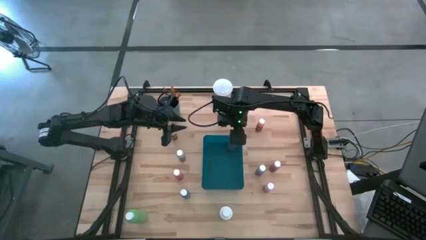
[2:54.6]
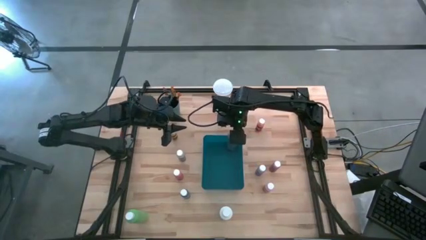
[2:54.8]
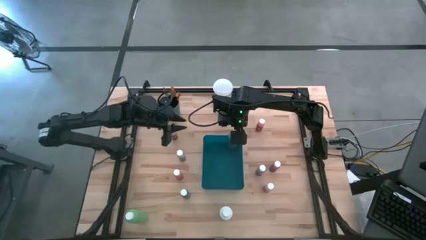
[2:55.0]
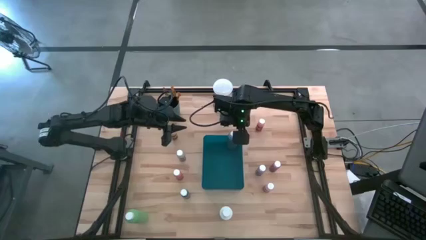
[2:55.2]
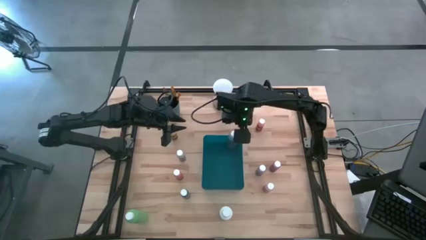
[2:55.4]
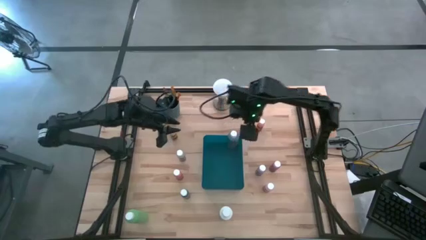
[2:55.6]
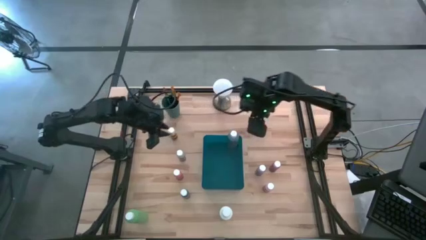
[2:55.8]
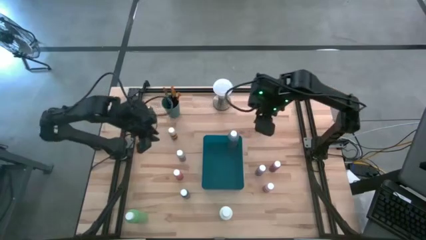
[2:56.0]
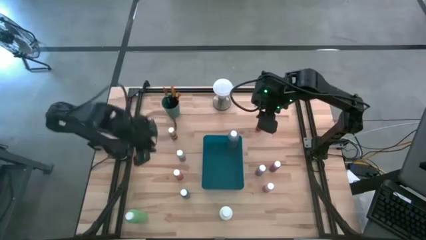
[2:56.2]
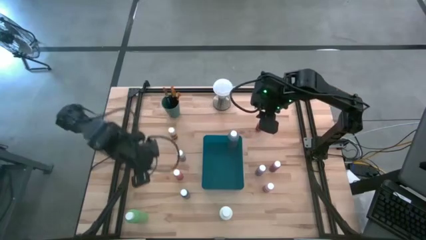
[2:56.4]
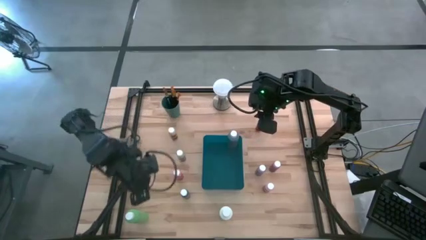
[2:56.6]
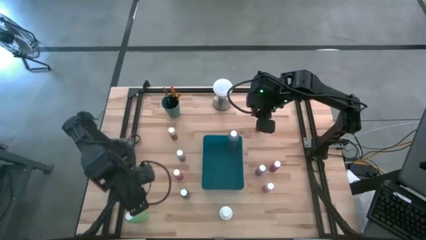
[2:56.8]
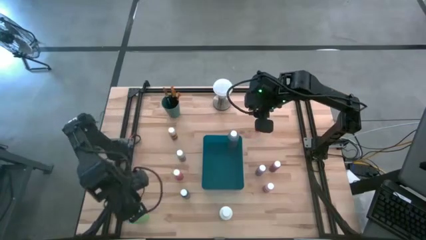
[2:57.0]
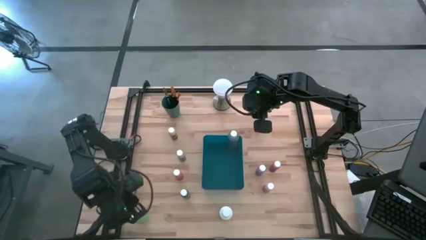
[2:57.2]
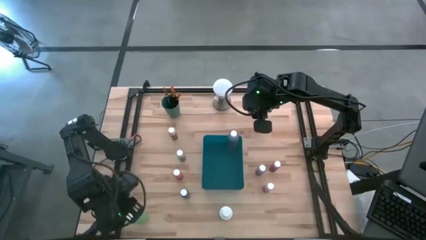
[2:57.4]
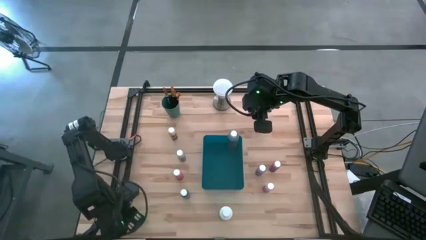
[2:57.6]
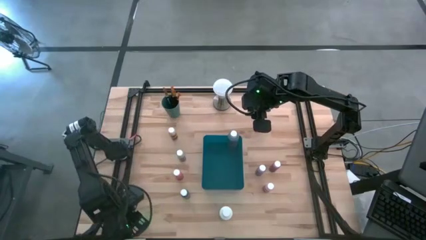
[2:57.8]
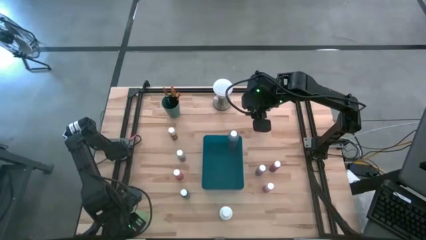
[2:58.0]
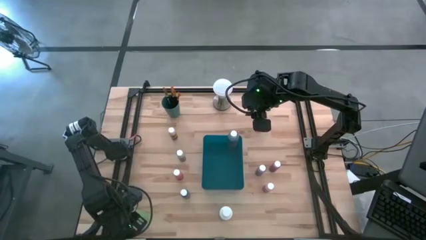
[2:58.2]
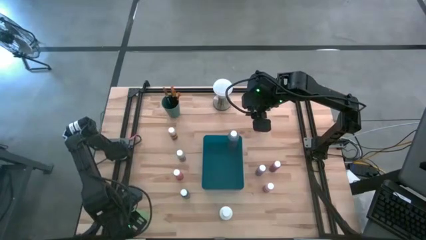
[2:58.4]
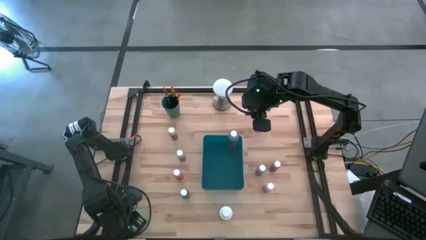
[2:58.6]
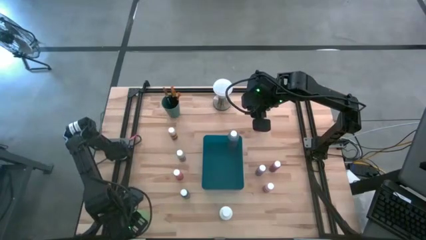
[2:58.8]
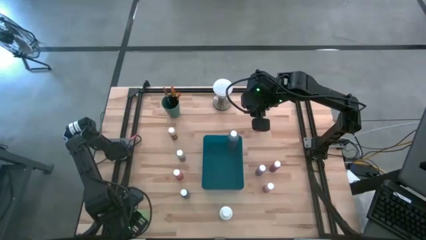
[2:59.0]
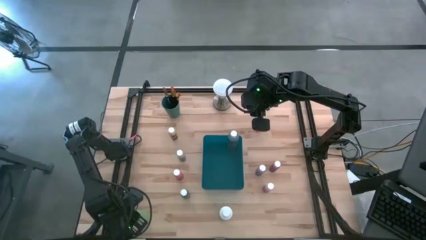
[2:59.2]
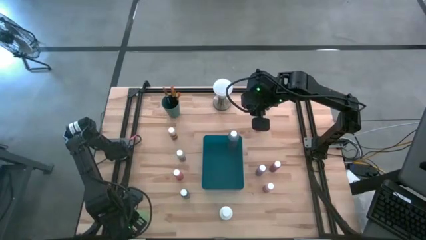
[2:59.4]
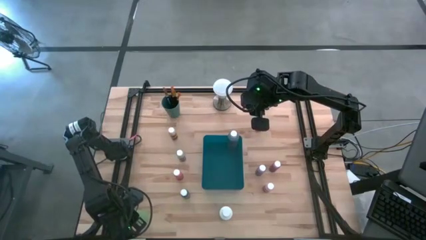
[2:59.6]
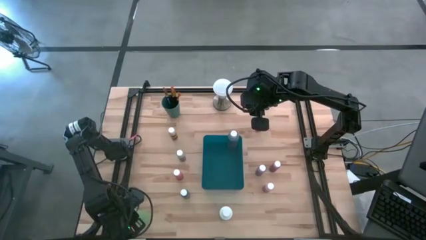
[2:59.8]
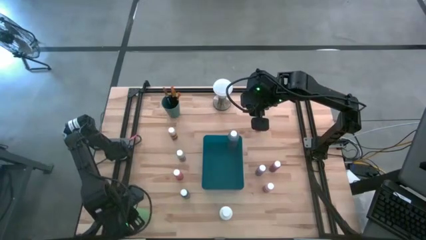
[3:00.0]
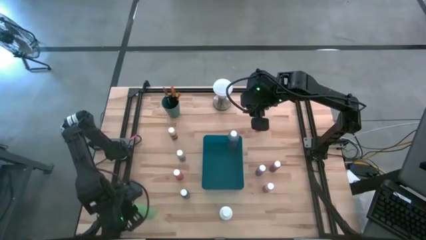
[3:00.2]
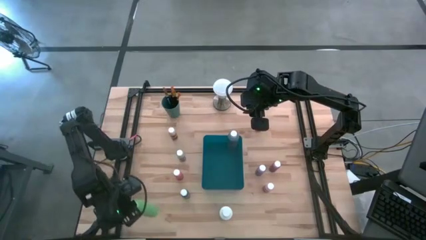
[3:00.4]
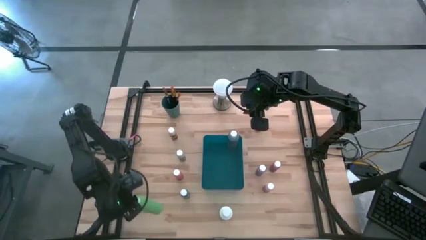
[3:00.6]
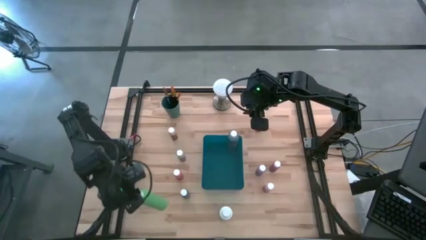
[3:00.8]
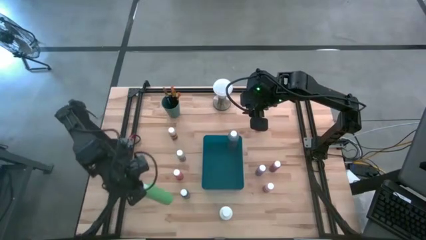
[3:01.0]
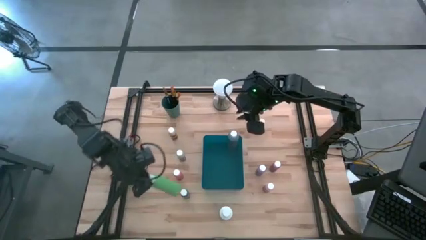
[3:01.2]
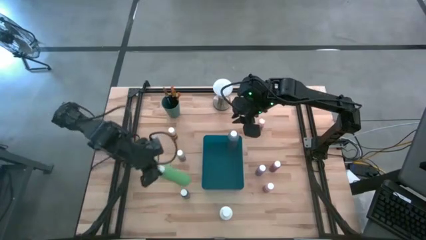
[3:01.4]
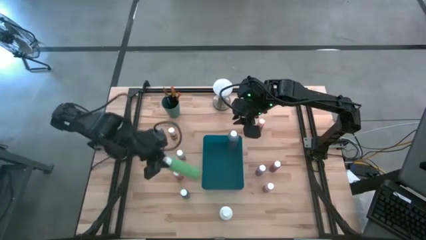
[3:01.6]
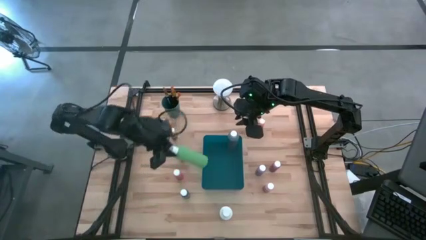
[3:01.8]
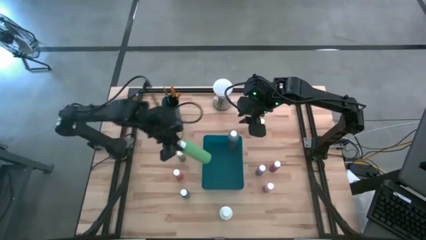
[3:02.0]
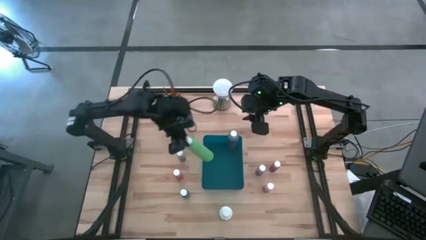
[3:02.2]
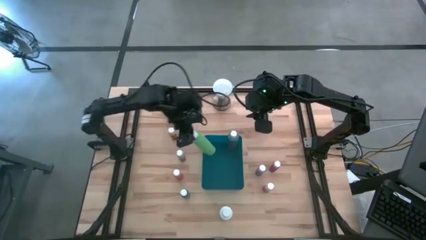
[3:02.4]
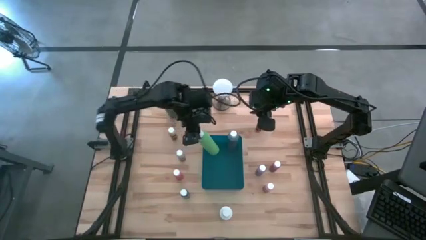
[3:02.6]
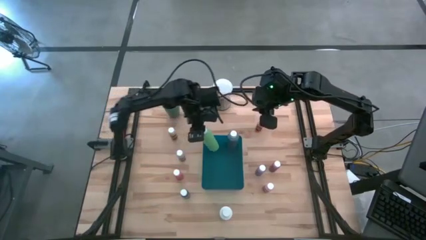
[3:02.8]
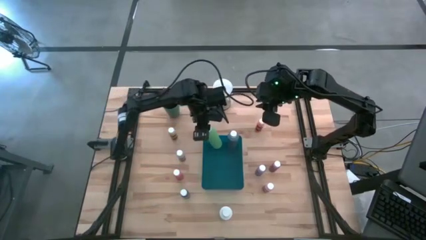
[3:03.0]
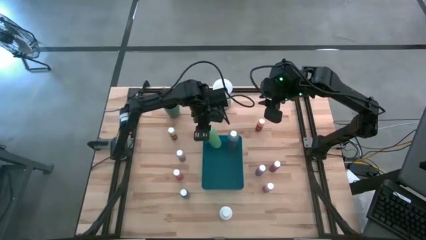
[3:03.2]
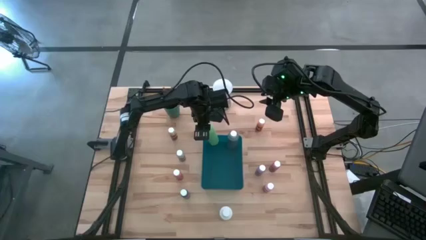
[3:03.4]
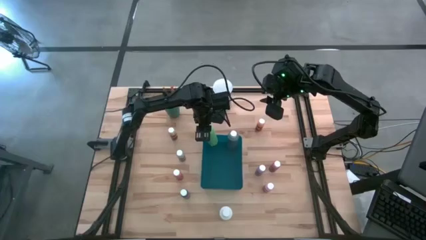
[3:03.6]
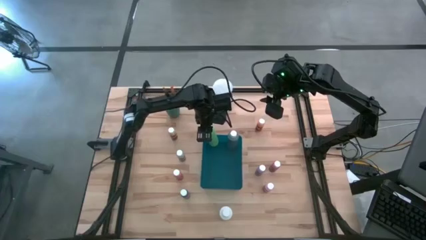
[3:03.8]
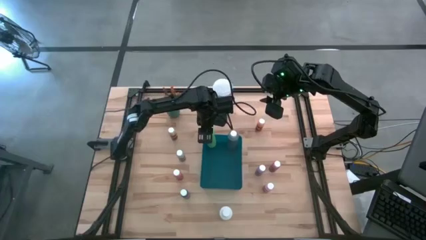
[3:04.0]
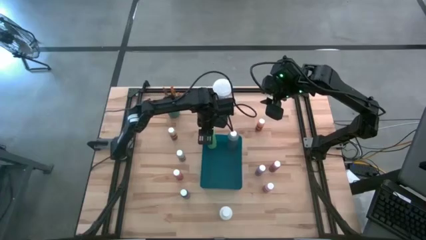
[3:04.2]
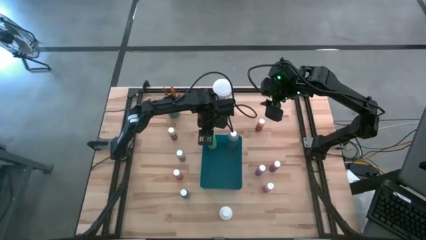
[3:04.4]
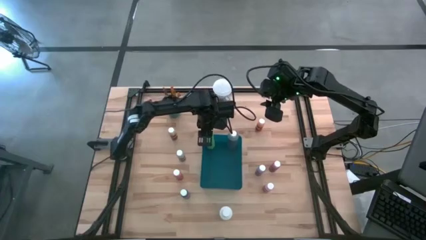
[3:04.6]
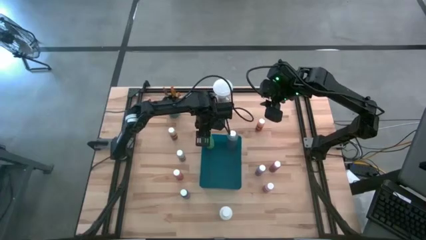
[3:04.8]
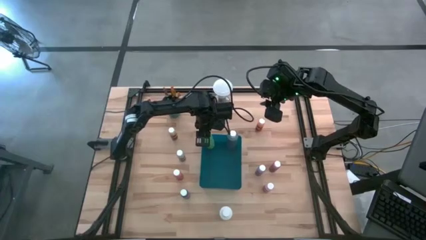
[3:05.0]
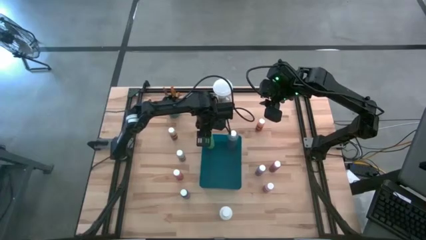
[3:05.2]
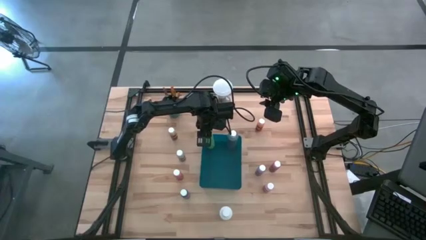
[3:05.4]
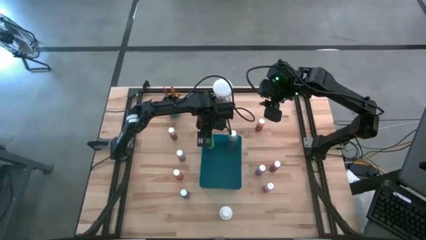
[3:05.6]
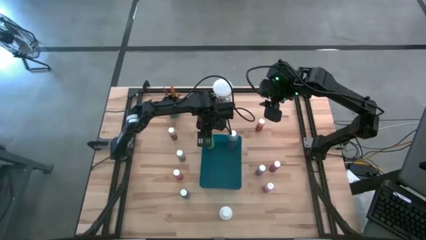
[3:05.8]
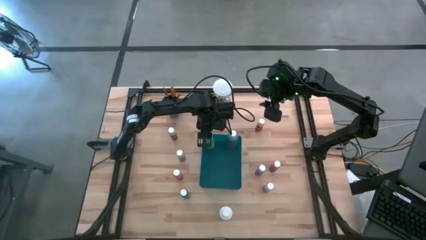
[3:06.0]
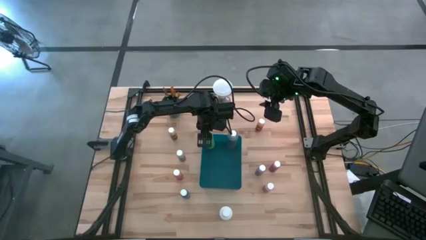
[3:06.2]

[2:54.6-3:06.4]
Task: Pick & Place Paint Supplies
Put the green paint bottle into the blue bin

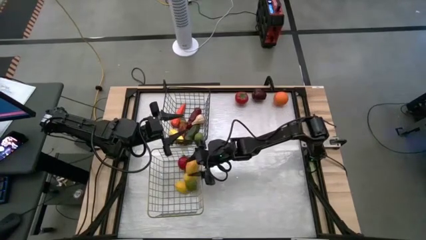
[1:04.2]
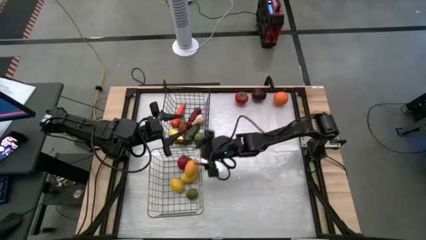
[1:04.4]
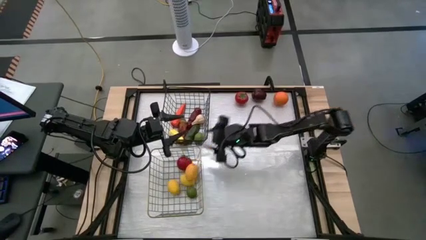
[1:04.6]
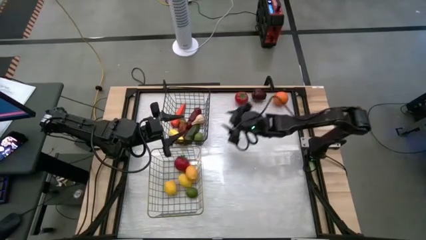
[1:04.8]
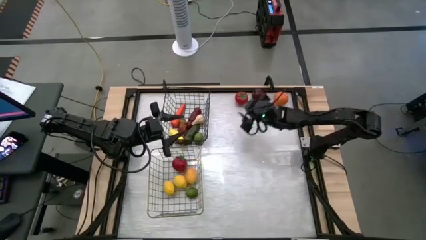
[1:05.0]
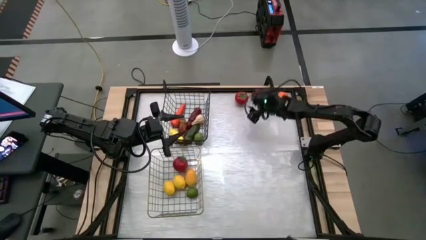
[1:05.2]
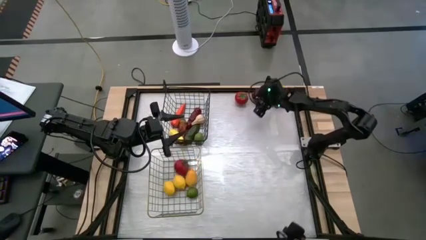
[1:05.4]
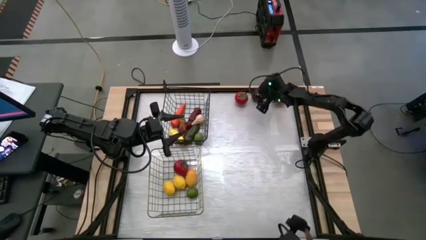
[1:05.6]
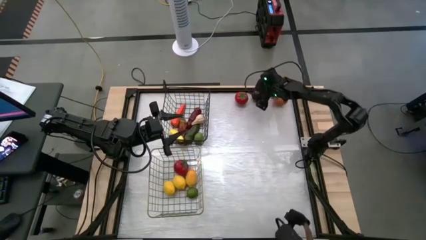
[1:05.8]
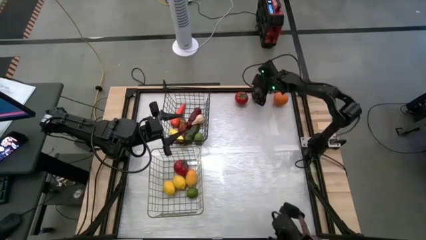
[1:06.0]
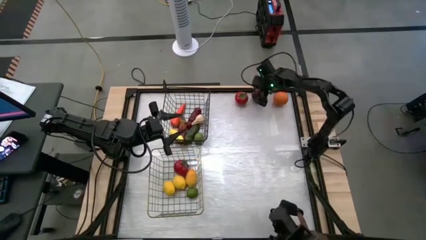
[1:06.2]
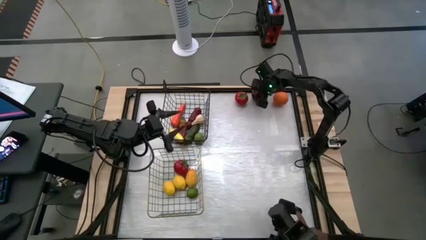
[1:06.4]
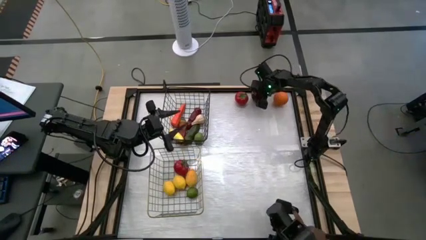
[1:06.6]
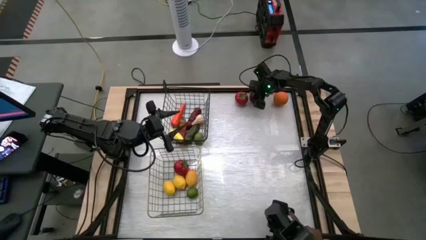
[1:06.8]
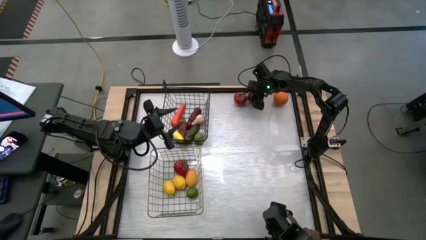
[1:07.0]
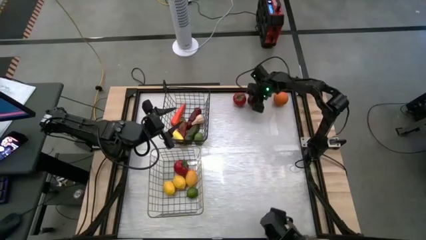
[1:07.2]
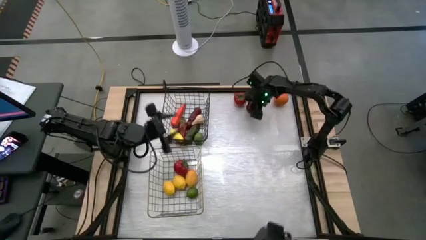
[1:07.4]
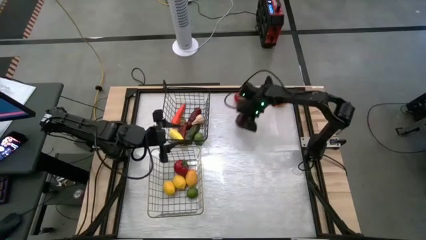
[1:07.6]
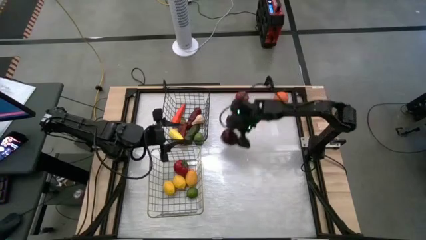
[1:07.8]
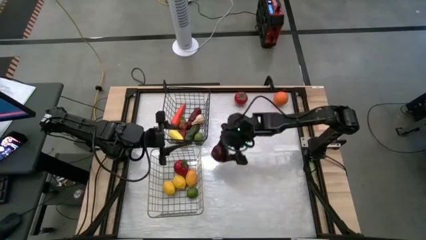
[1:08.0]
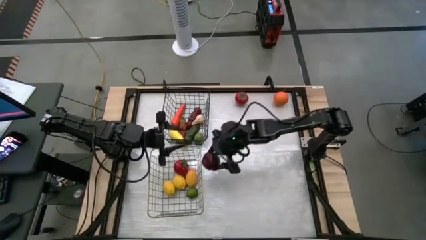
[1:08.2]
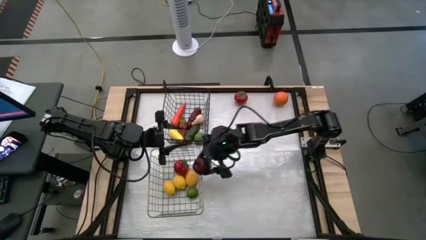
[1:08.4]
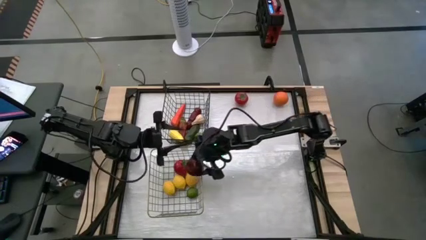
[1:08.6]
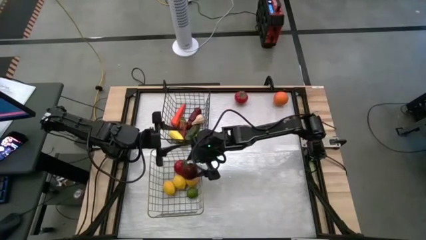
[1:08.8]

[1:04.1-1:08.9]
Task: Sort produce into baskets
Put the red apple into the gold wire basket

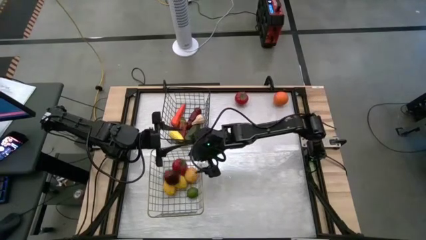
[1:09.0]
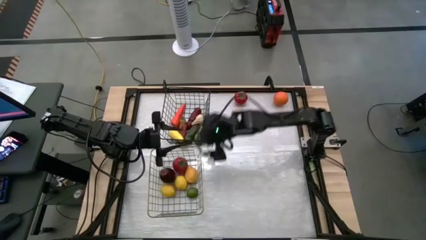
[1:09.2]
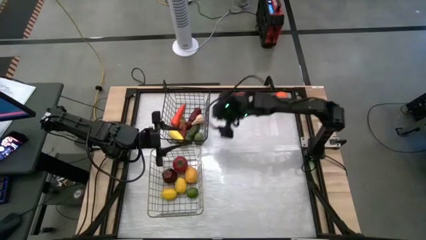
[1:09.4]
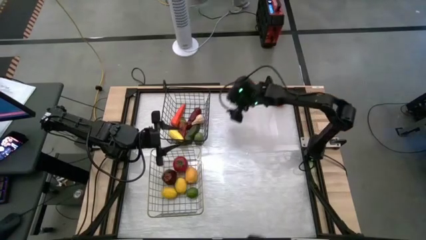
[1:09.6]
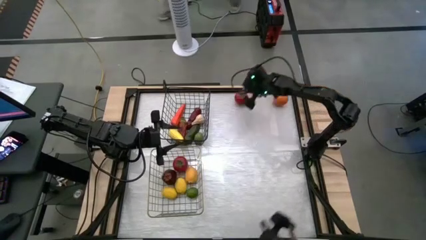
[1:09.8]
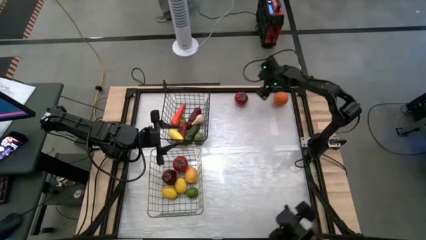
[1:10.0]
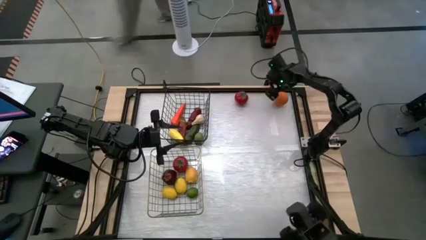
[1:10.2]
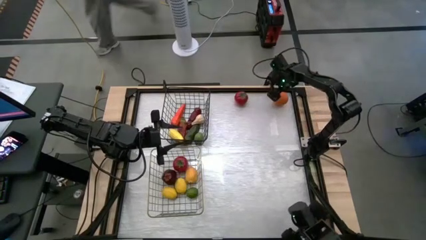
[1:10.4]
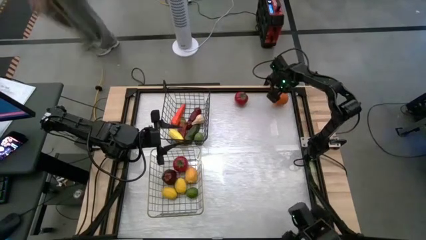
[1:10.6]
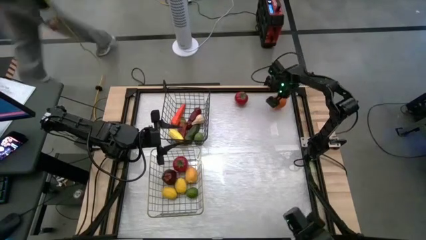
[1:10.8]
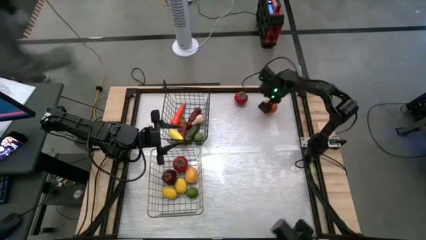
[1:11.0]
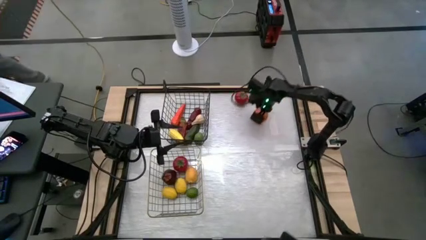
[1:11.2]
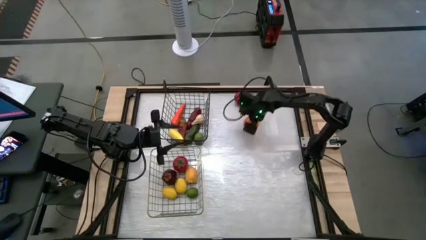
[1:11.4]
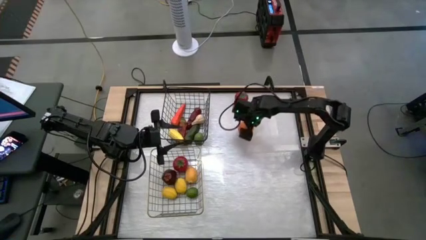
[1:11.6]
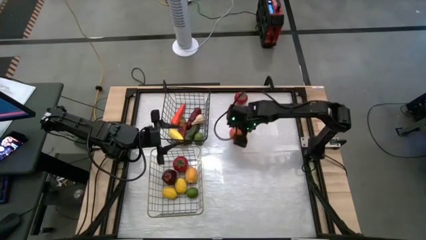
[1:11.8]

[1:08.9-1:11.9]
Put the orange into the gold wire basket
